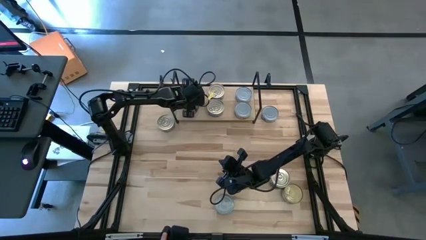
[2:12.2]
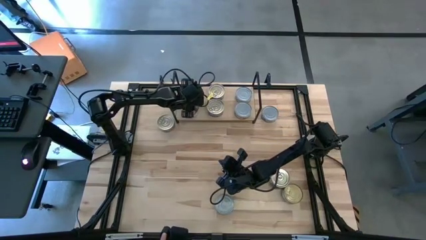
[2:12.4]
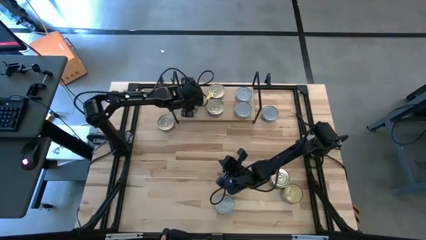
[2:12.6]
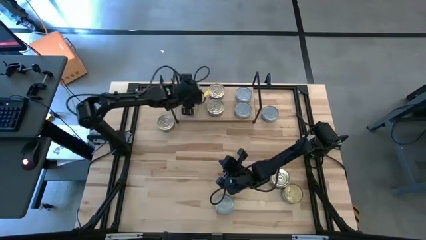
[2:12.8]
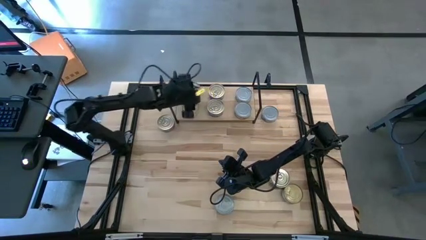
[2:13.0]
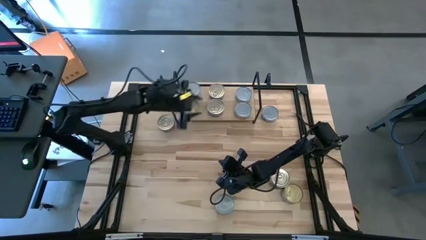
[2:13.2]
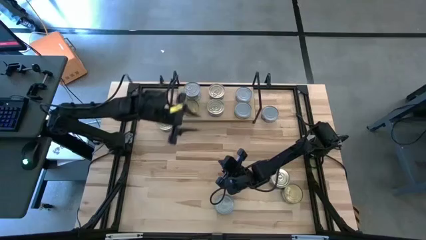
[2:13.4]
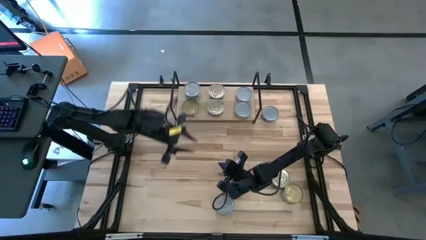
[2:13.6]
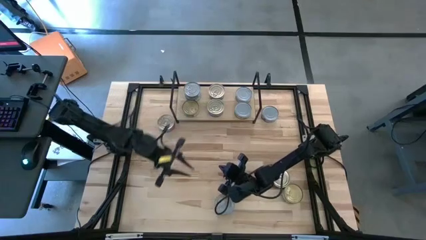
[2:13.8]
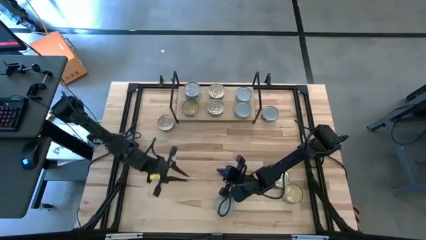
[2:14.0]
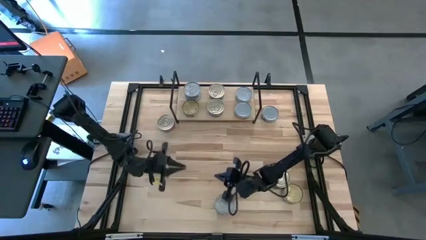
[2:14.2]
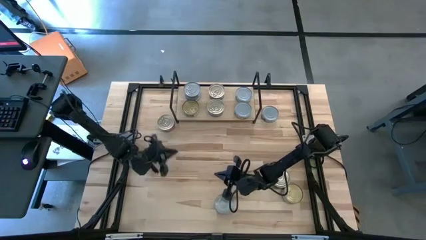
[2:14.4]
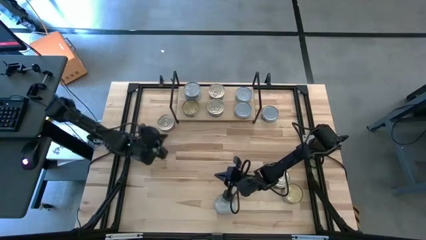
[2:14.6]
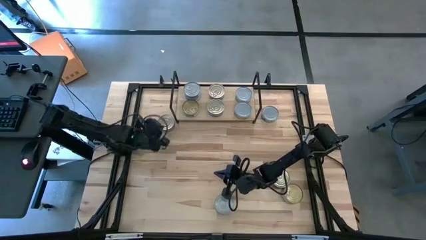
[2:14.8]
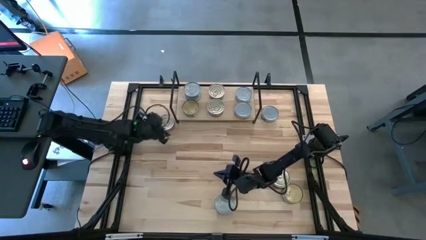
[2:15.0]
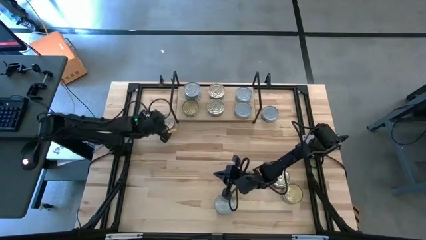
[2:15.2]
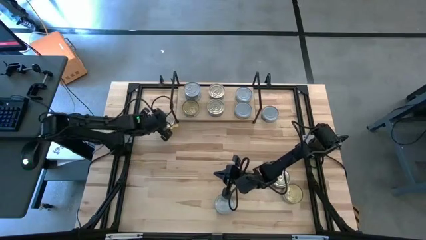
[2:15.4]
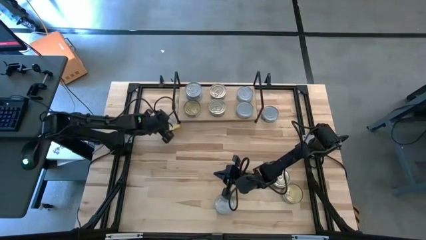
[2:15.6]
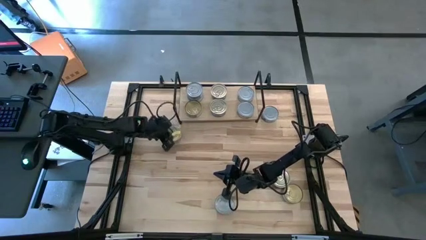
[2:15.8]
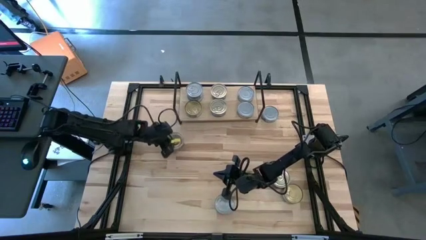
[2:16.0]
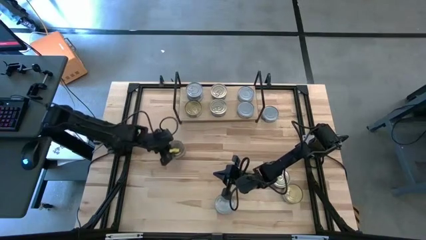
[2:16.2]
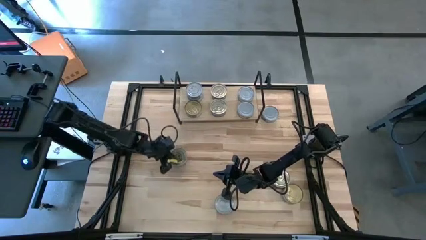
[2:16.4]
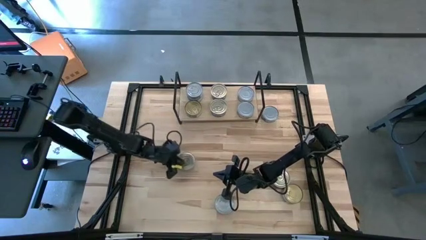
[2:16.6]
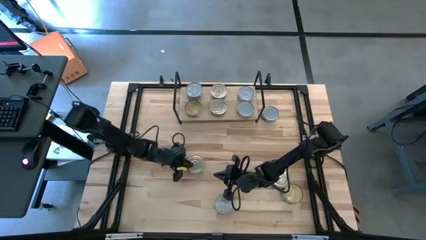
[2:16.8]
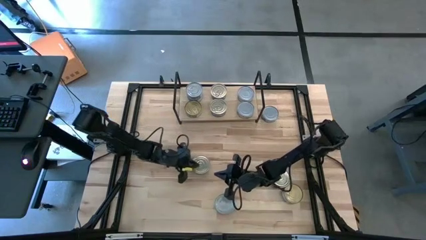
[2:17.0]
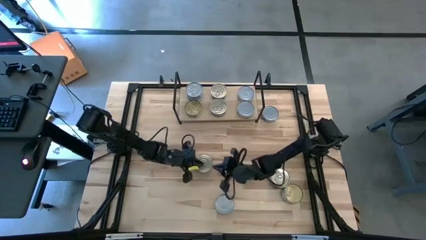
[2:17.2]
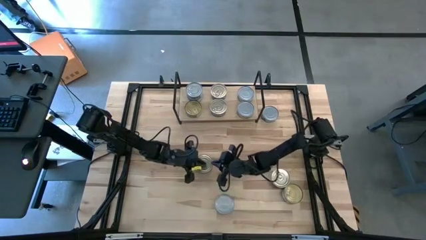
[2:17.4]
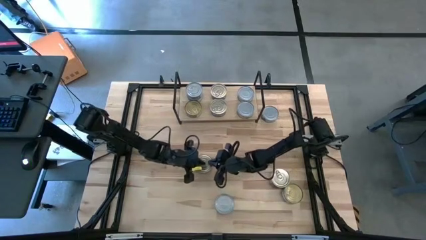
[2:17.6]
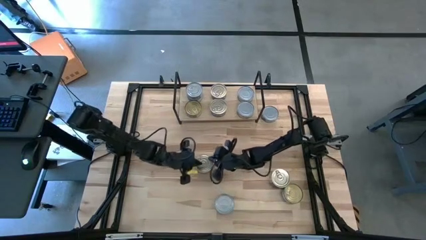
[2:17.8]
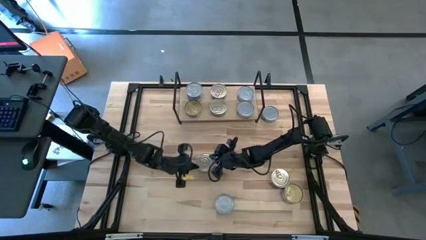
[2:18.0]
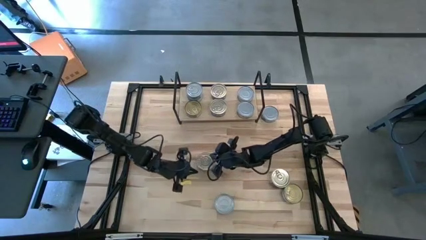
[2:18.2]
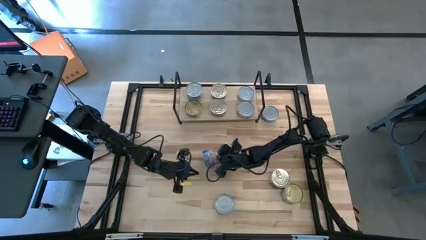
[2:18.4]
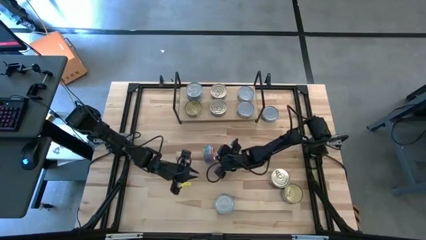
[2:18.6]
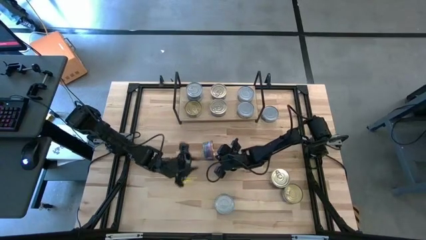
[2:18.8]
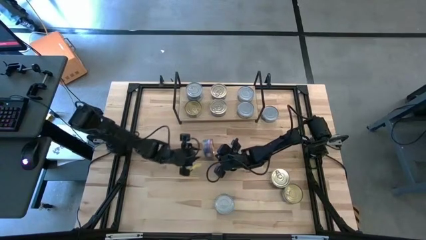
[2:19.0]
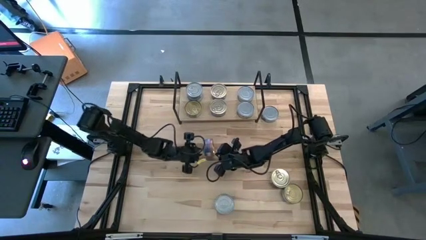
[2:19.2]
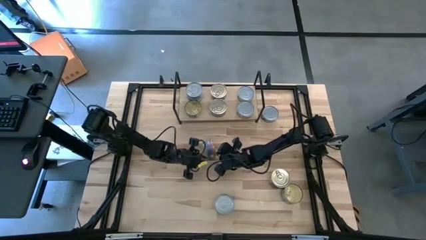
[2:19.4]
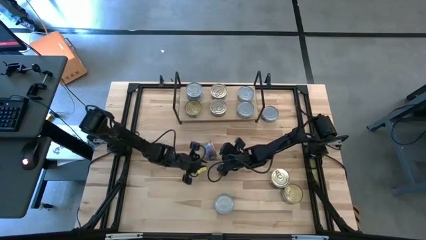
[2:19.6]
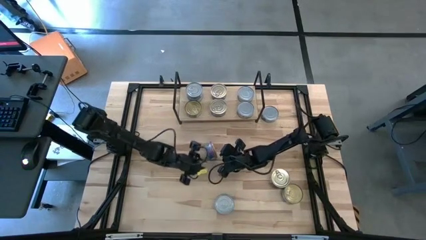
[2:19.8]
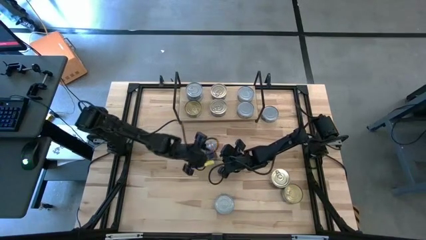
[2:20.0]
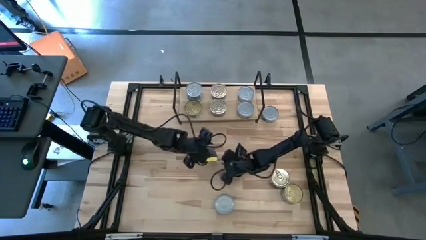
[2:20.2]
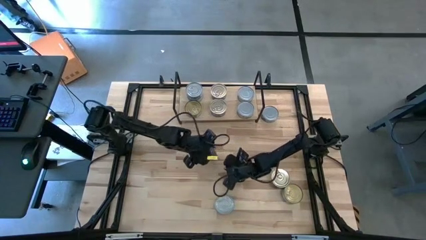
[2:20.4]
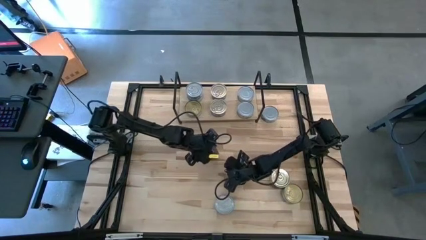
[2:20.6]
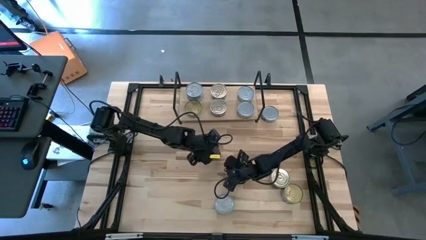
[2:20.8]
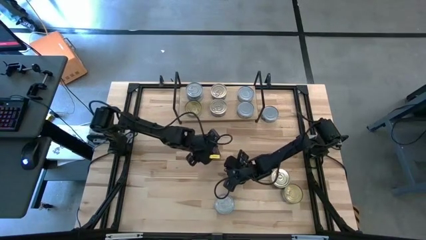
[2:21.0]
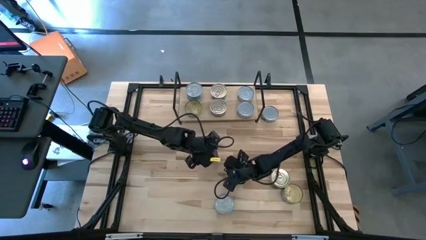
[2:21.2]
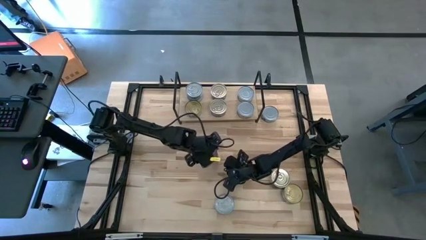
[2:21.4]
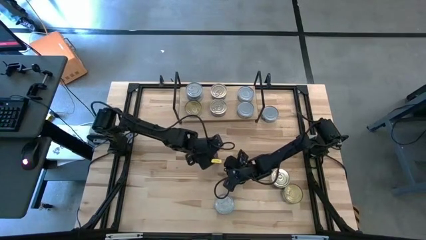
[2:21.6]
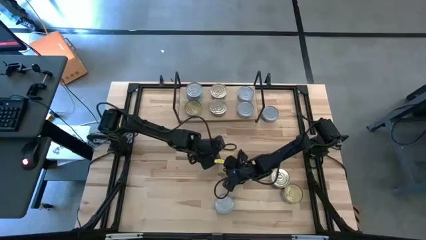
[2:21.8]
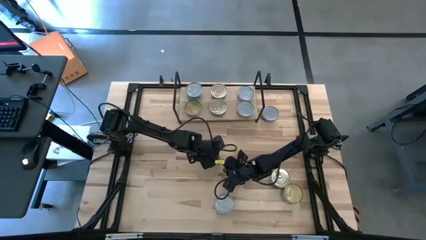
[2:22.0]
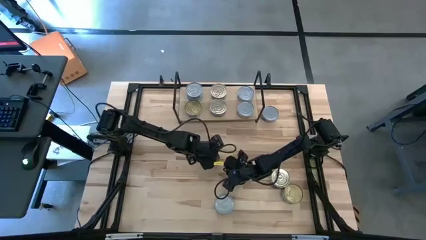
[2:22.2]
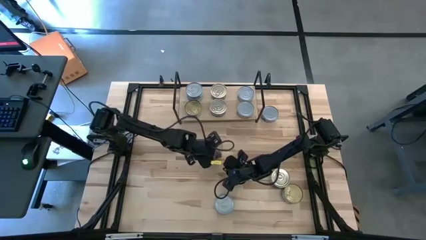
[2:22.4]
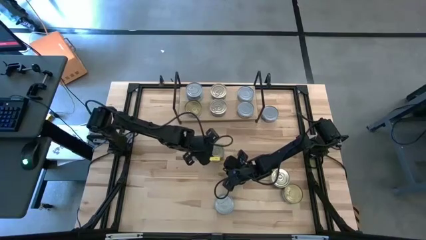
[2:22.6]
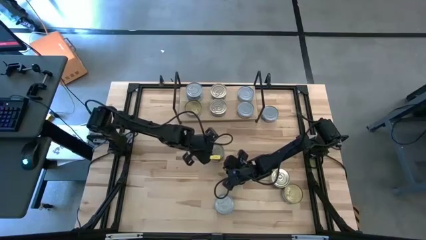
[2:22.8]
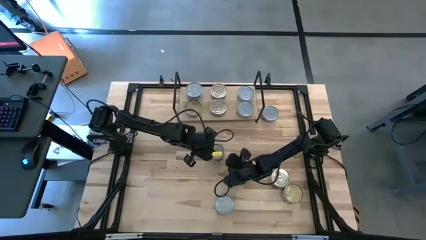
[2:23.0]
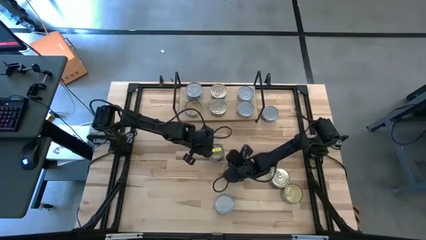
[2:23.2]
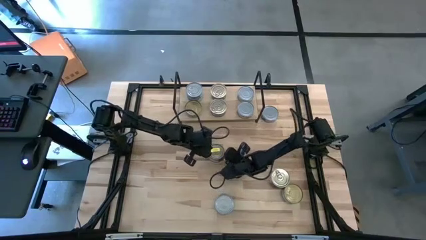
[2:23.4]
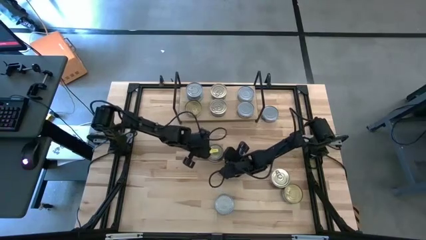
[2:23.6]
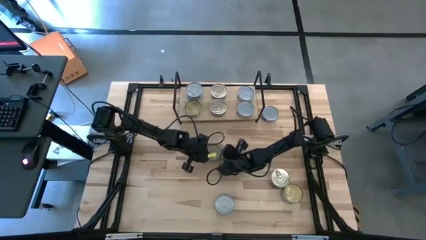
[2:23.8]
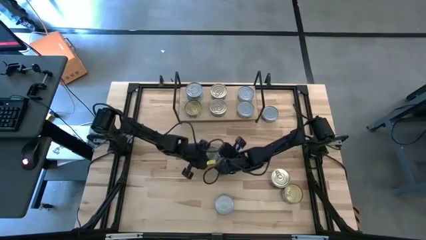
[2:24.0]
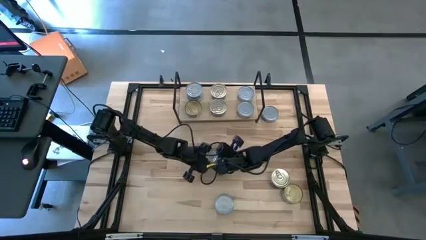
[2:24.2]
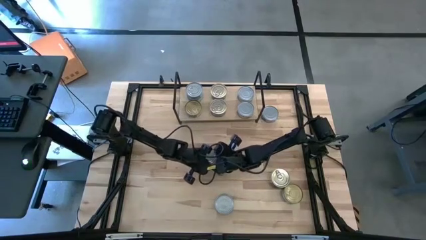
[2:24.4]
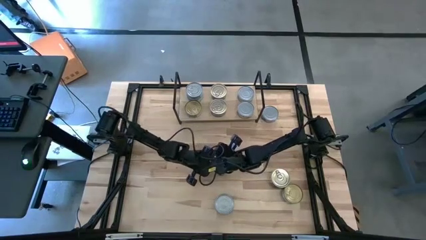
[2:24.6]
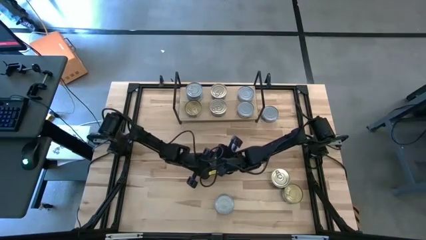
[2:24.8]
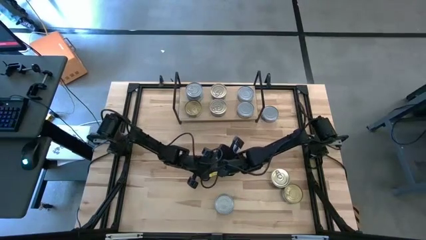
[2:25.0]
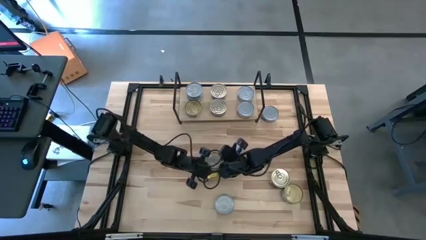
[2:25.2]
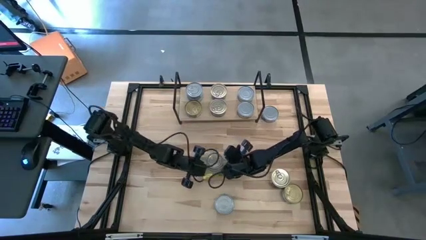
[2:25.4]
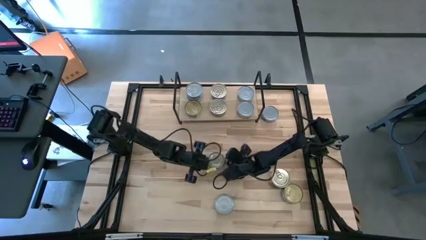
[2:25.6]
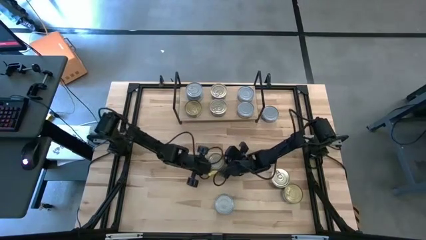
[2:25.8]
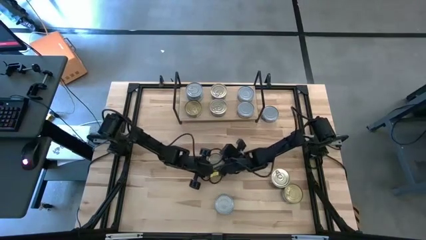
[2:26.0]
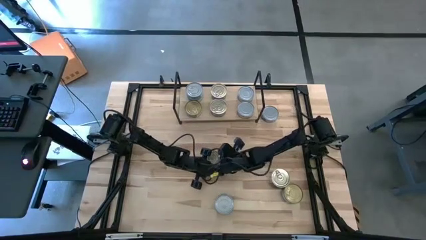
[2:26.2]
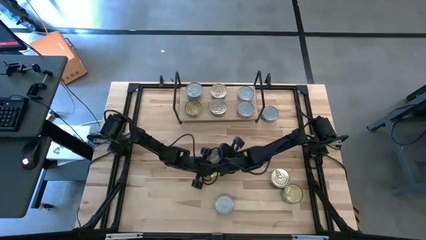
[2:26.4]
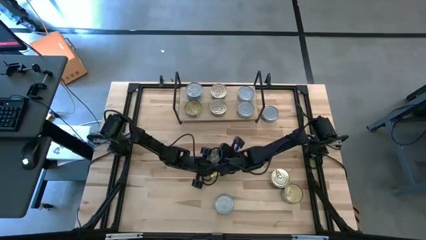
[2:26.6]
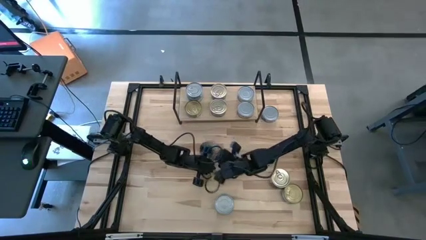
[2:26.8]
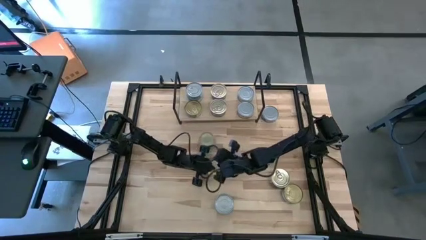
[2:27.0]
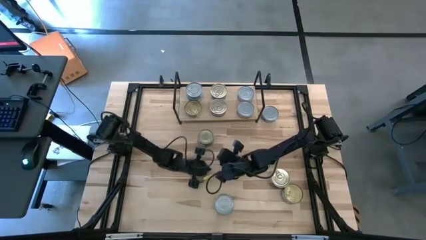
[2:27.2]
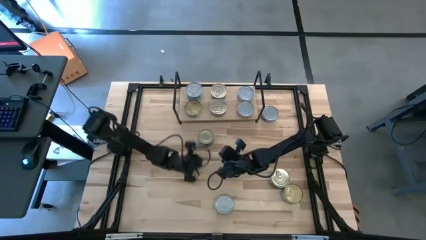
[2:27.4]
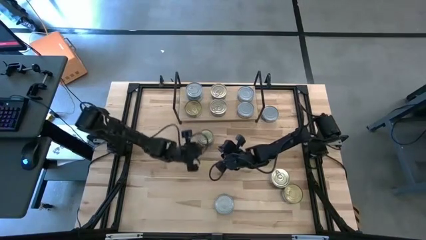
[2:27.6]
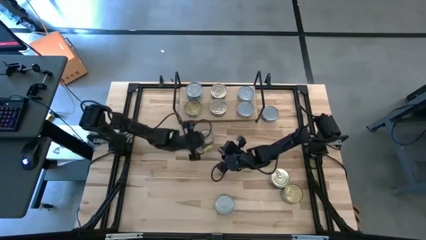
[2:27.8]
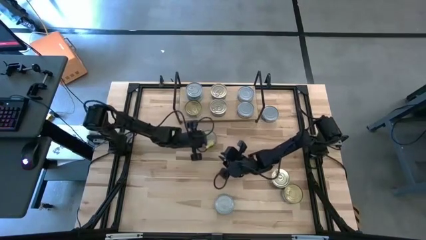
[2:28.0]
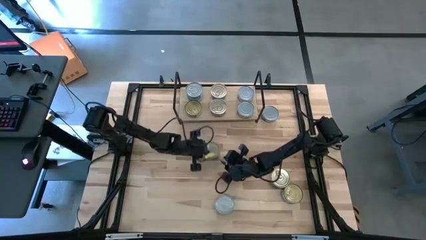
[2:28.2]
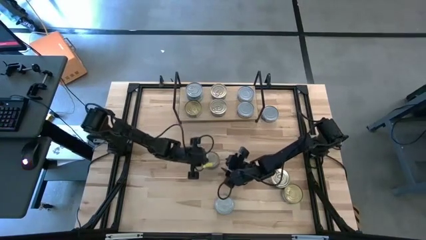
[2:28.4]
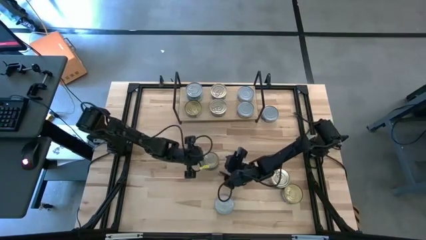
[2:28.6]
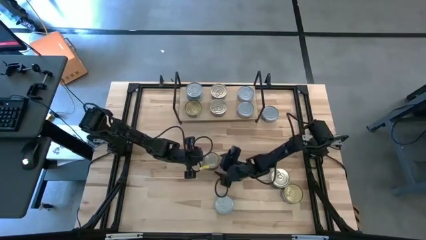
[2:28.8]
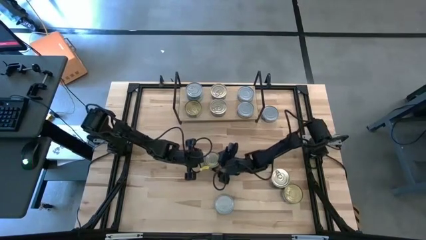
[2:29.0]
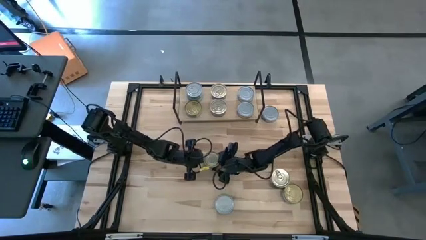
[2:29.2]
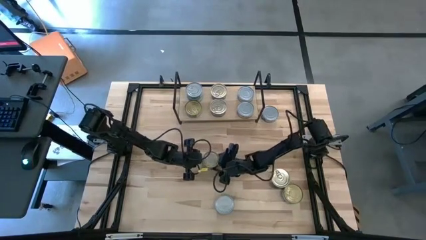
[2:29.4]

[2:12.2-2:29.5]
Task: Stack canned seafood by type on shelf
Stack the left blue tuna can on top of the blue tuna can on the shelf
